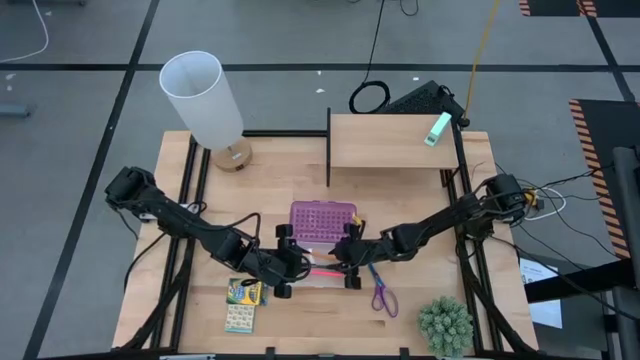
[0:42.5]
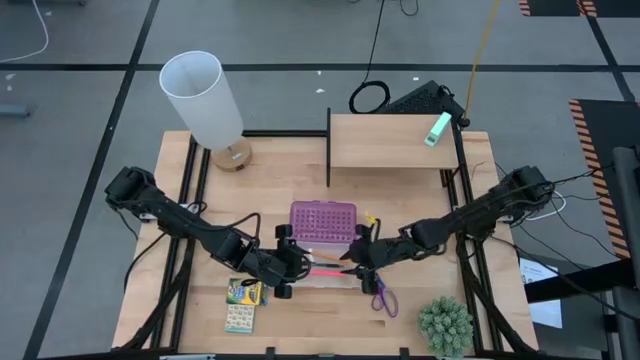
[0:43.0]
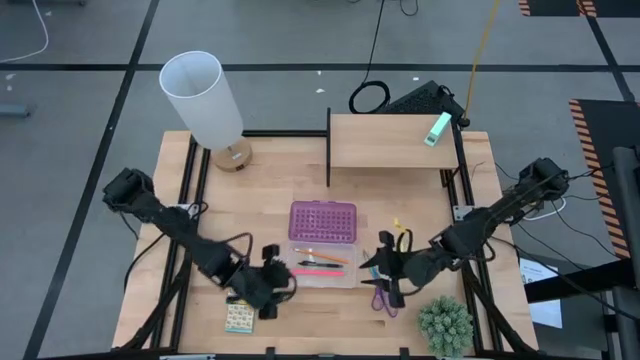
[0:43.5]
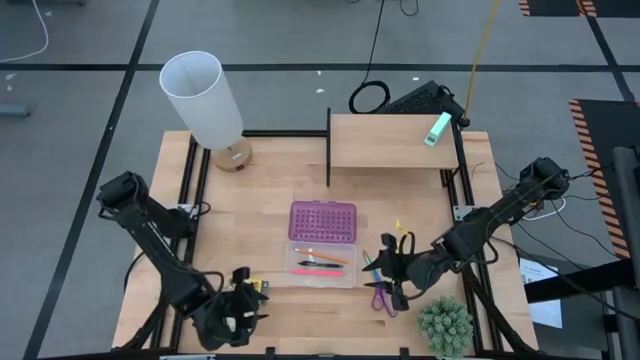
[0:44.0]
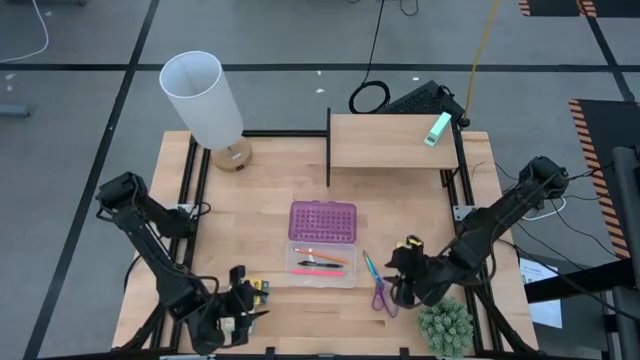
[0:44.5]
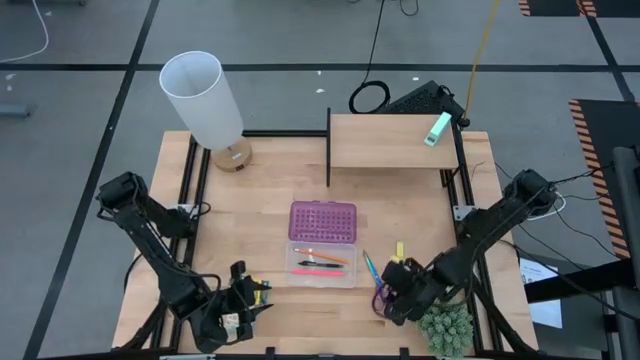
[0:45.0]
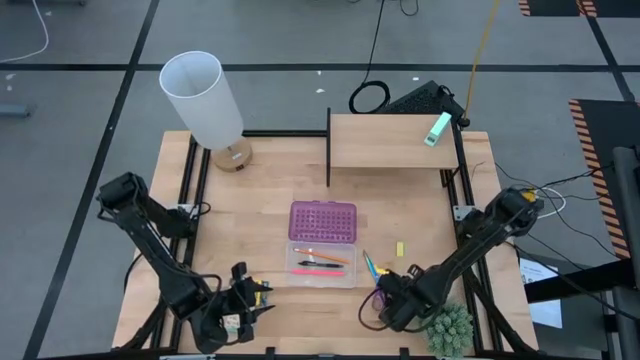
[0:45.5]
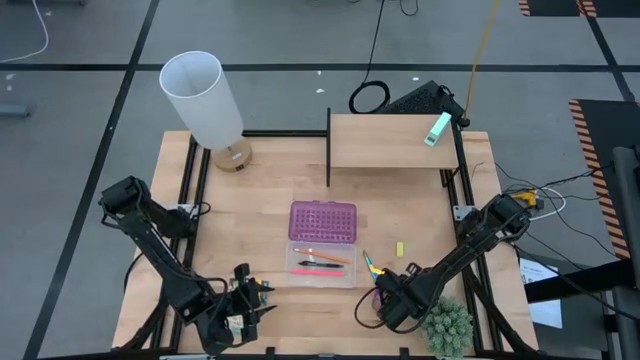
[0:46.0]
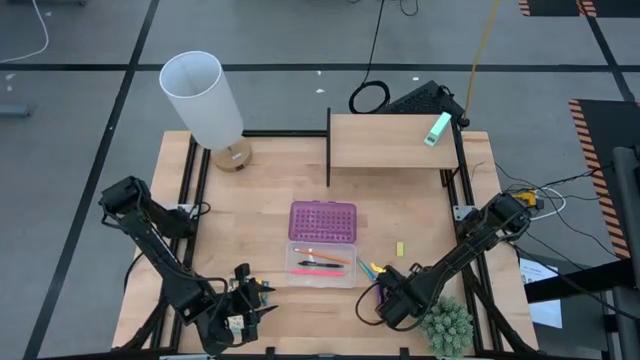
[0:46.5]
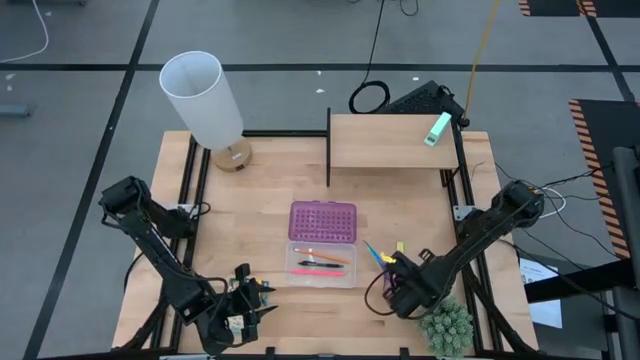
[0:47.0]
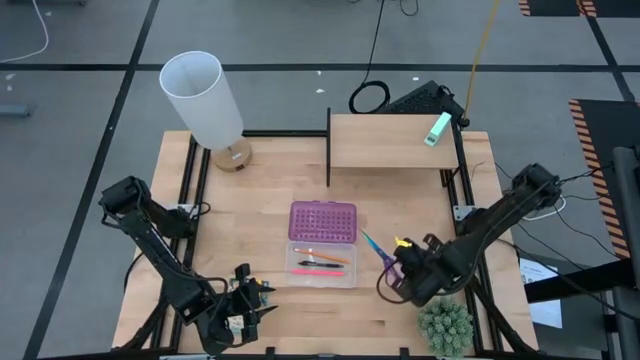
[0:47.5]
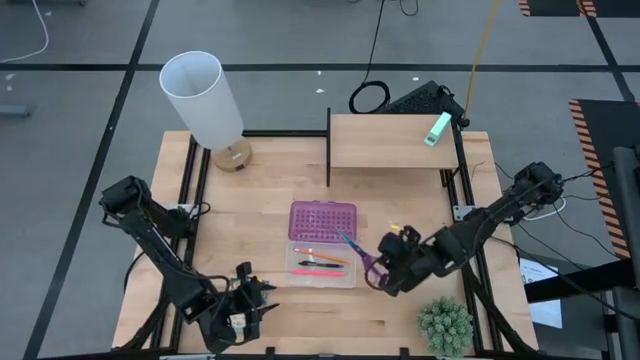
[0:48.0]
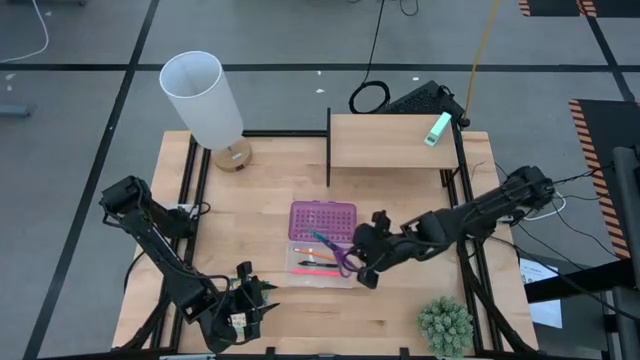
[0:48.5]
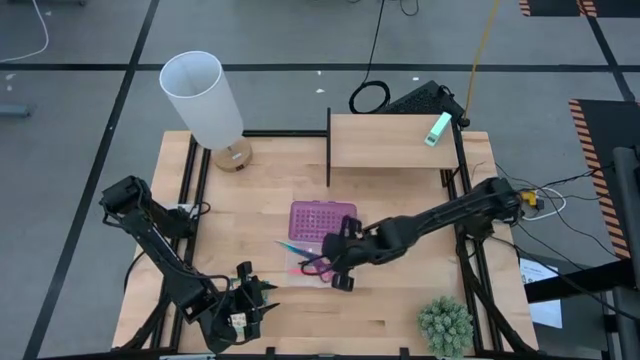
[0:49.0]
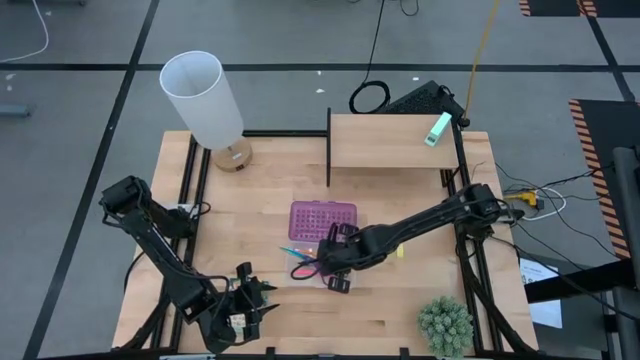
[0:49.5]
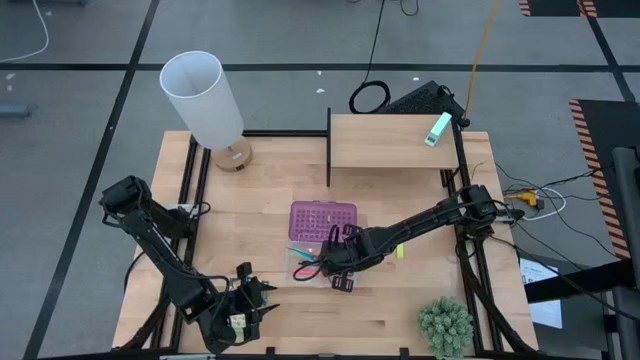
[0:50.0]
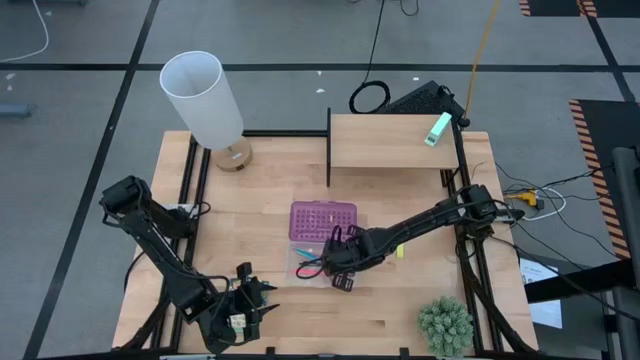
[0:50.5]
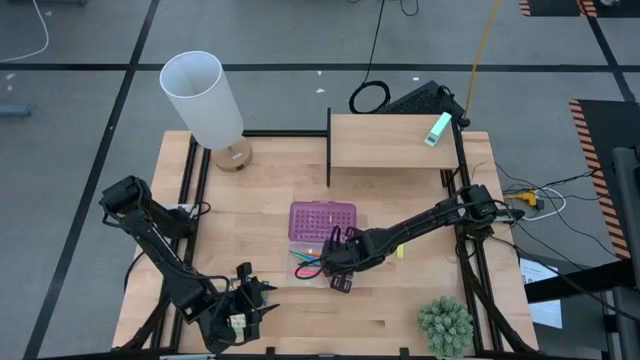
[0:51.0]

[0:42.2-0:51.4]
Task: Pack school essentials
Put the violet scissor into the violet pencil plastic case

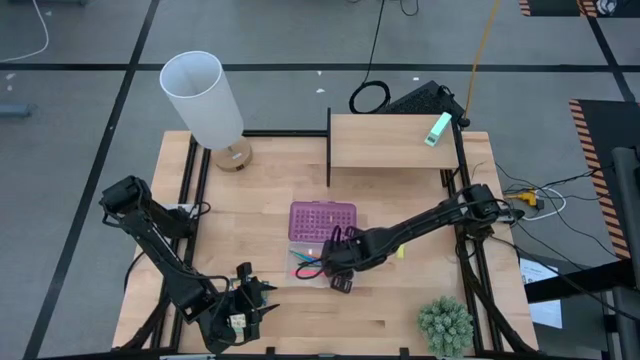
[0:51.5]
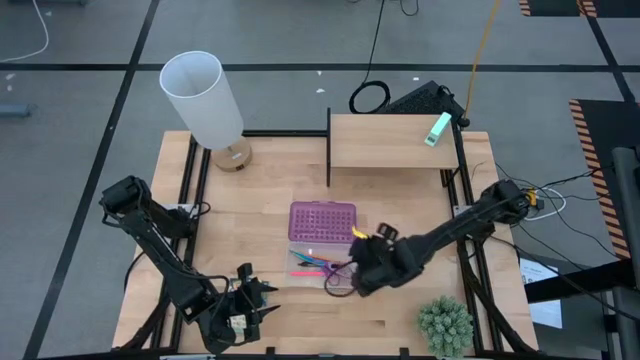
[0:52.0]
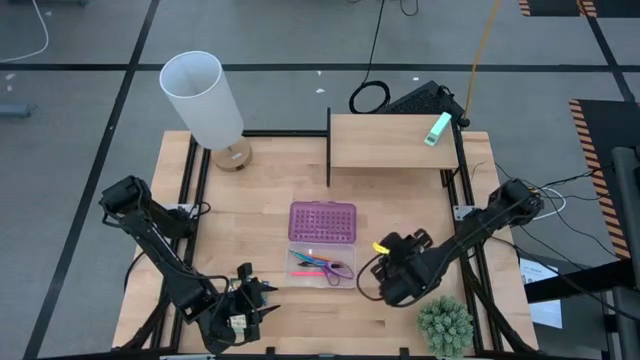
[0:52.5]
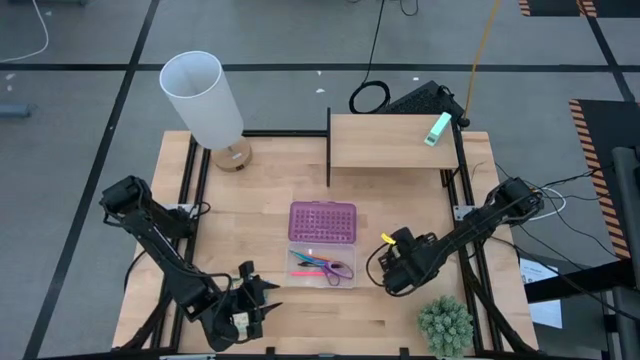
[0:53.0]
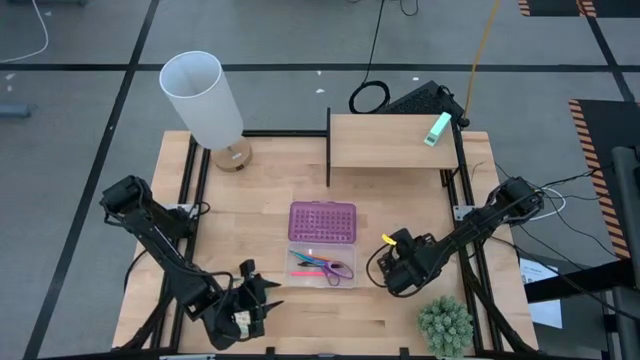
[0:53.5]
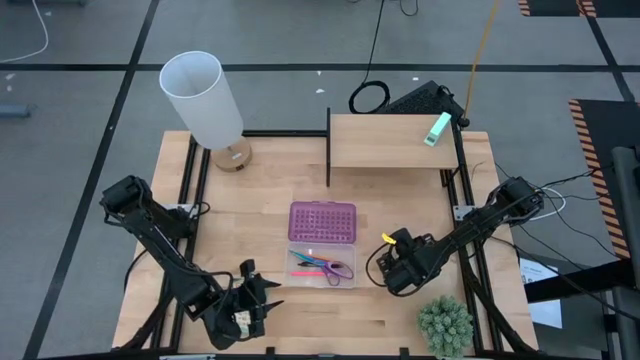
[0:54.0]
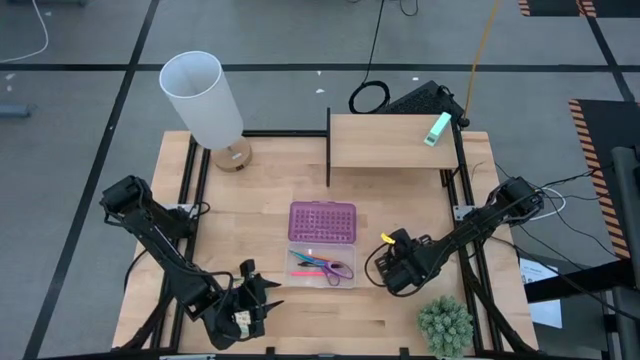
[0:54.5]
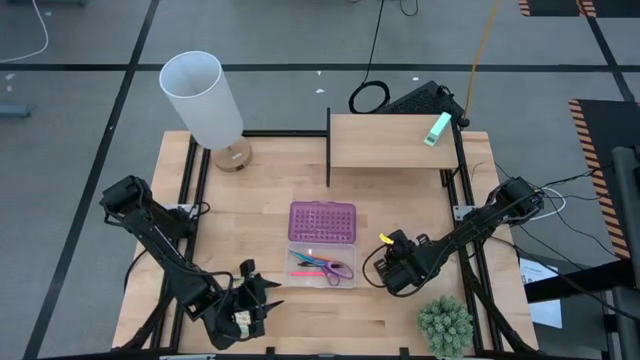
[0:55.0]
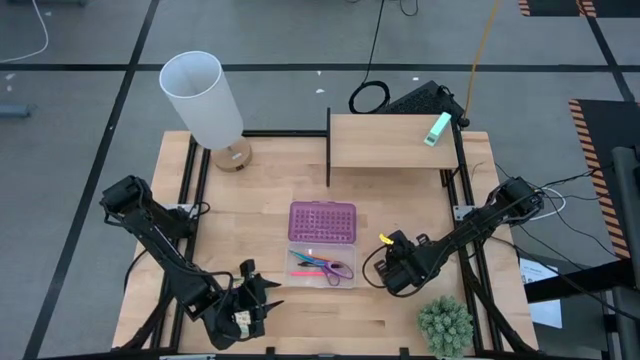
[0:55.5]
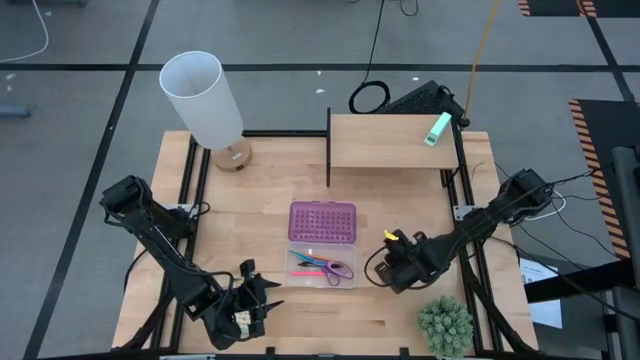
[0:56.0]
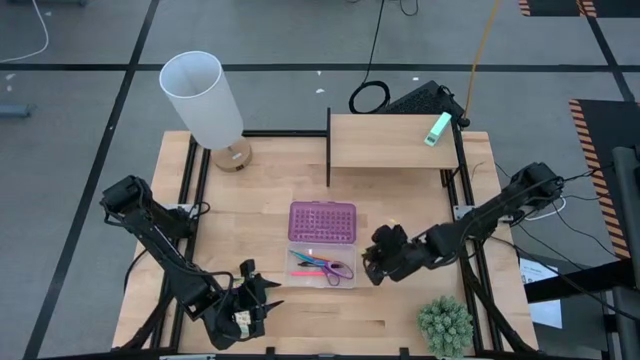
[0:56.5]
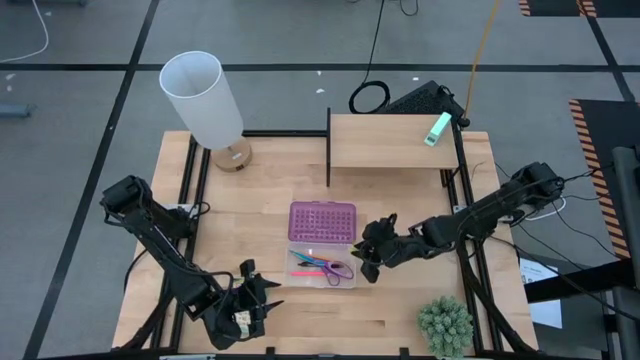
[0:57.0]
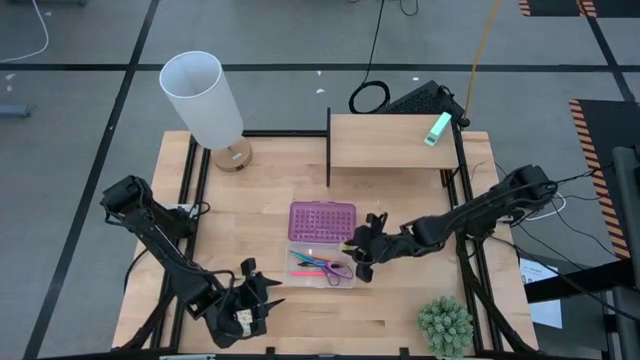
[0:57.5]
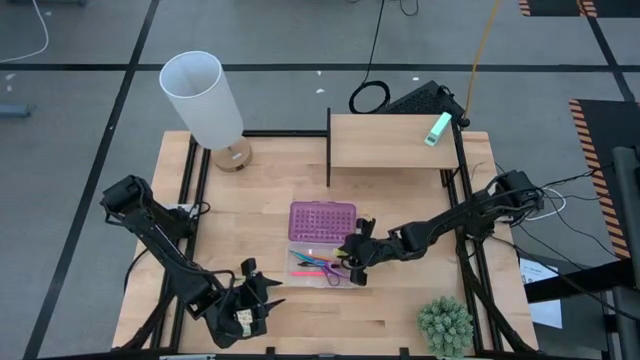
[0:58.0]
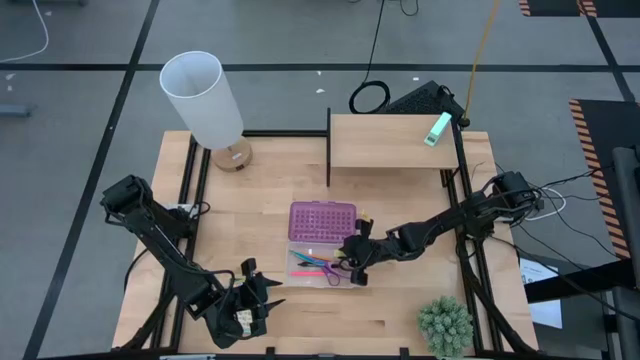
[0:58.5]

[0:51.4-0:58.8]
Put the yellow eraser into the violet plastic pencil case

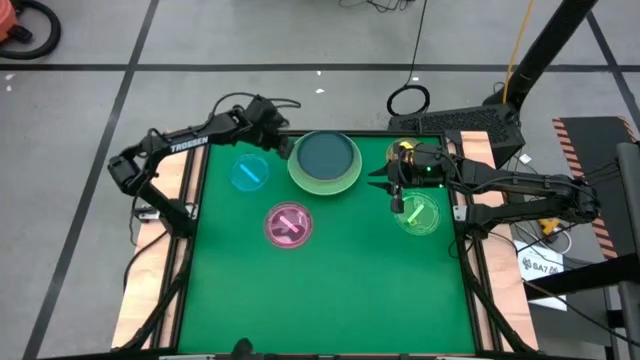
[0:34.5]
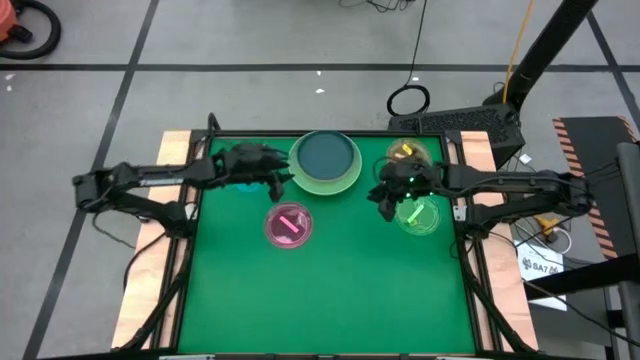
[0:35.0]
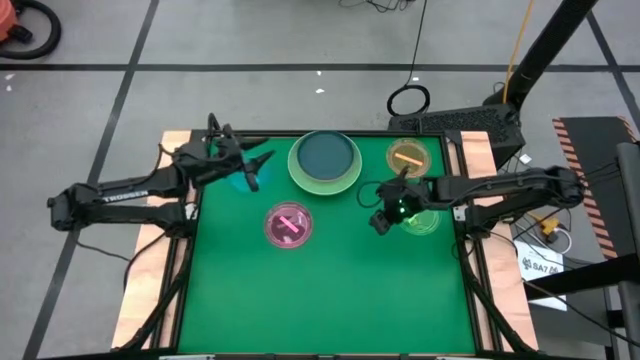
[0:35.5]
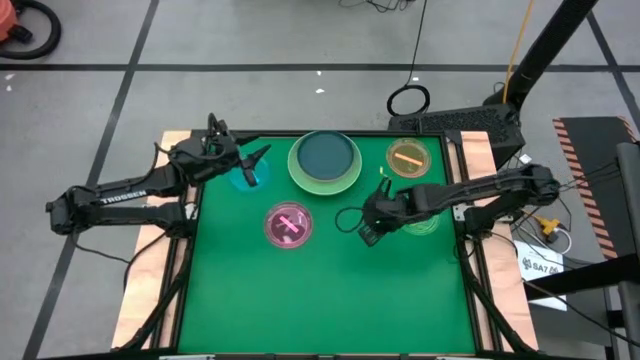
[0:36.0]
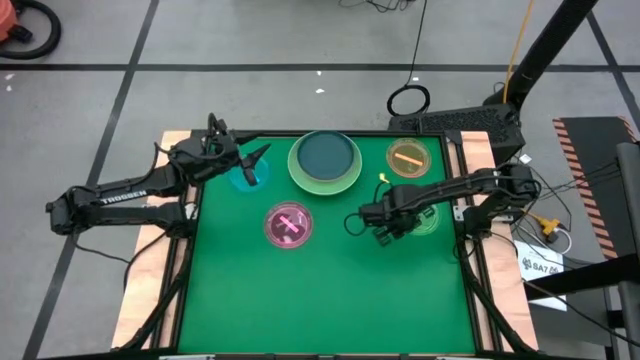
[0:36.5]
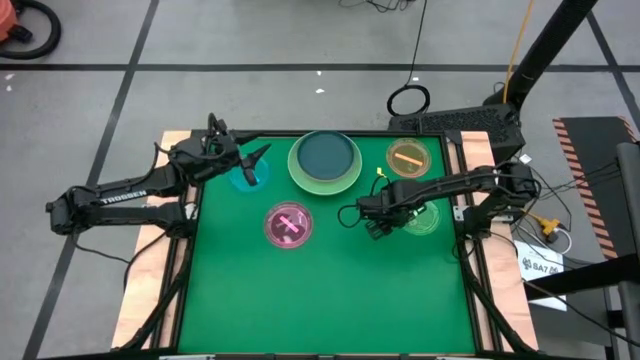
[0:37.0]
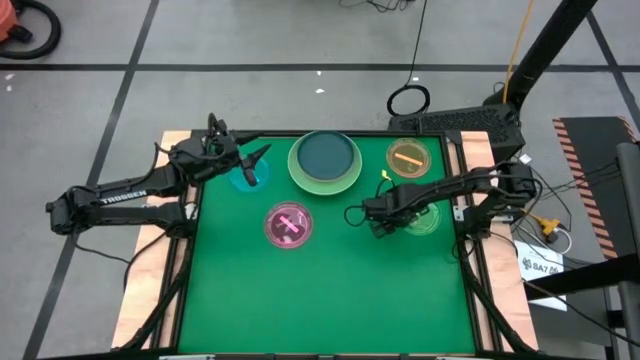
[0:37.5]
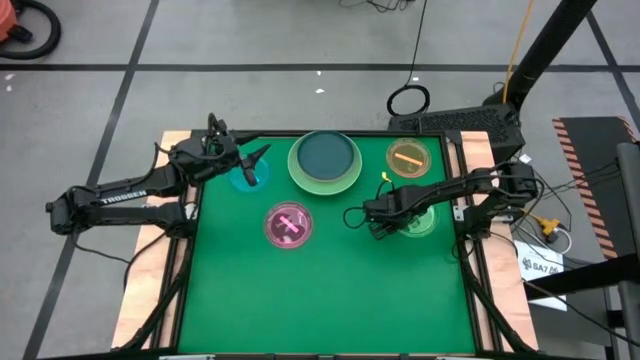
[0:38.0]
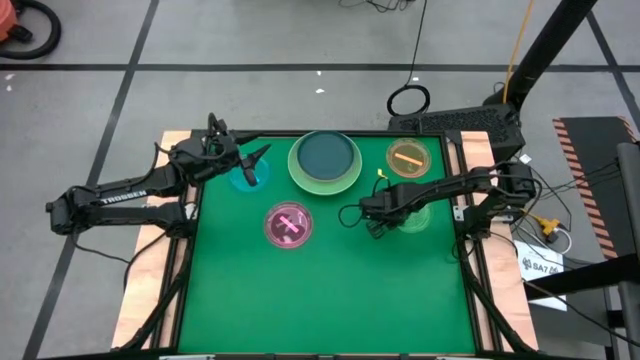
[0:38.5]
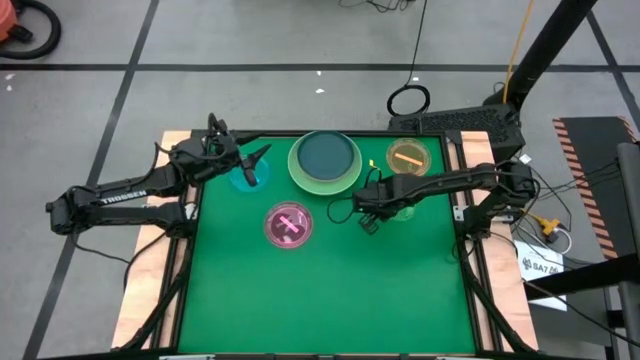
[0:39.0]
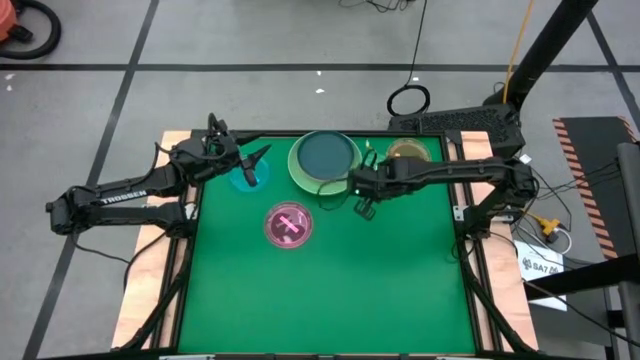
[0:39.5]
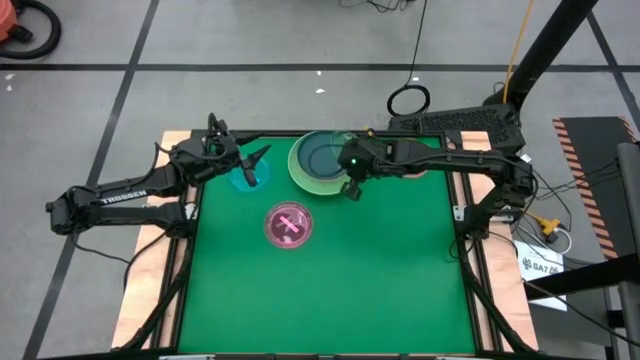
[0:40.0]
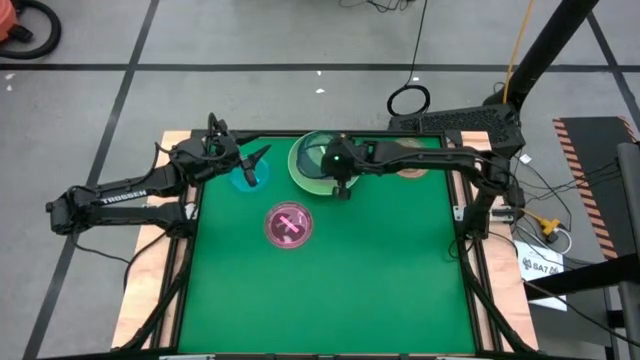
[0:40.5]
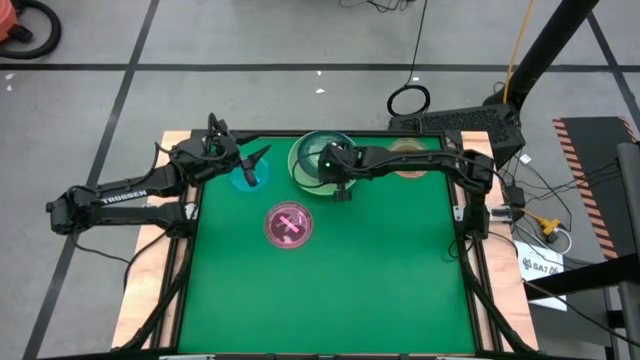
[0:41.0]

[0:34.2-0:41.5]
Task: Stack plastic plates
Stack the green plate on top of the dark blue plate
